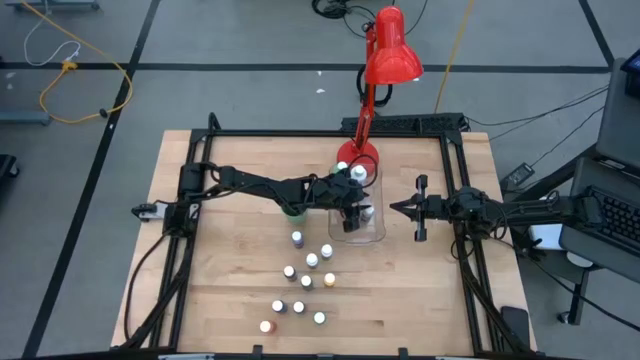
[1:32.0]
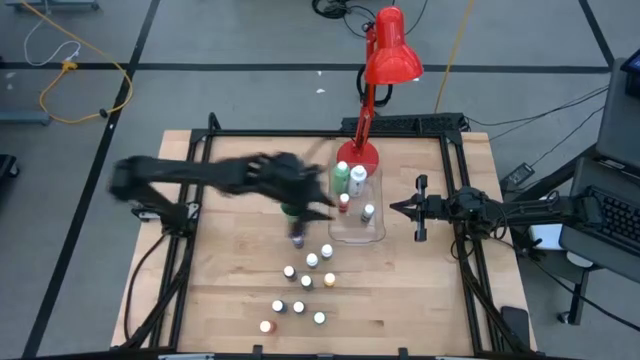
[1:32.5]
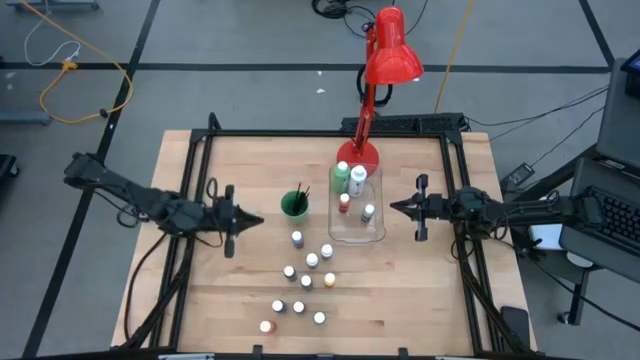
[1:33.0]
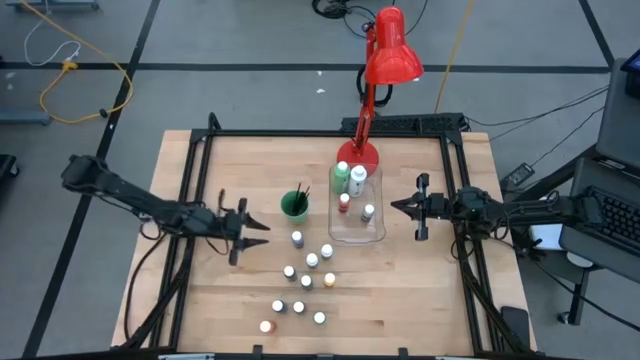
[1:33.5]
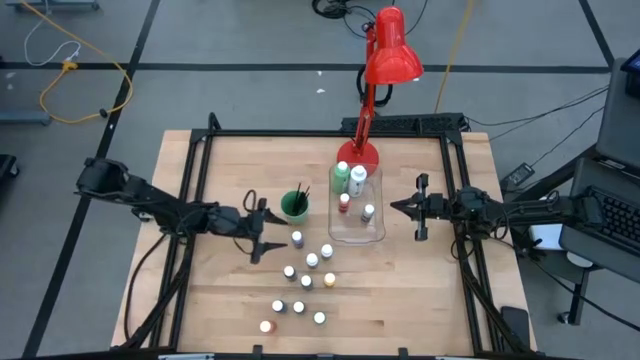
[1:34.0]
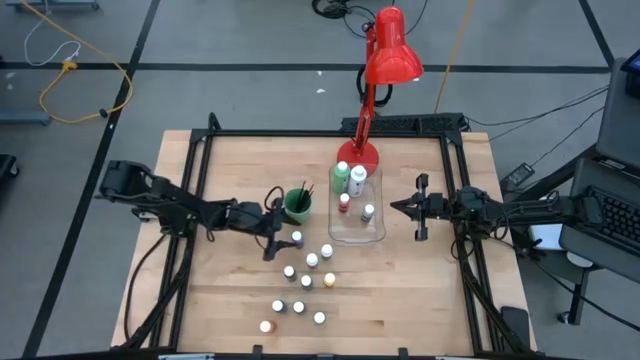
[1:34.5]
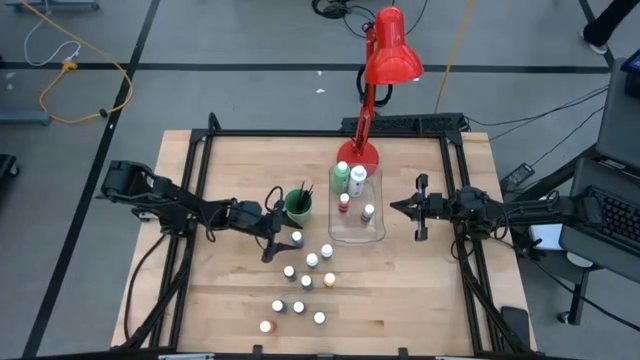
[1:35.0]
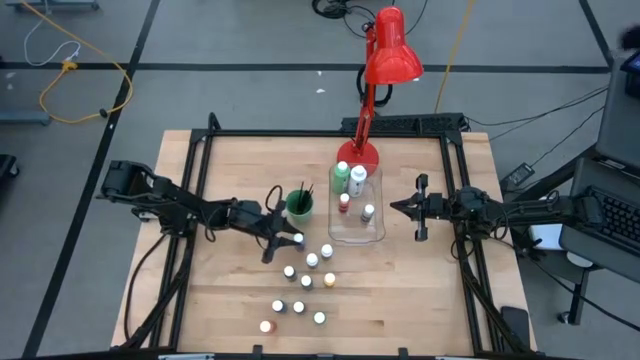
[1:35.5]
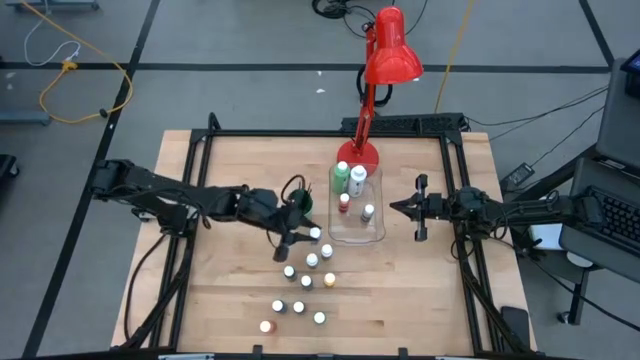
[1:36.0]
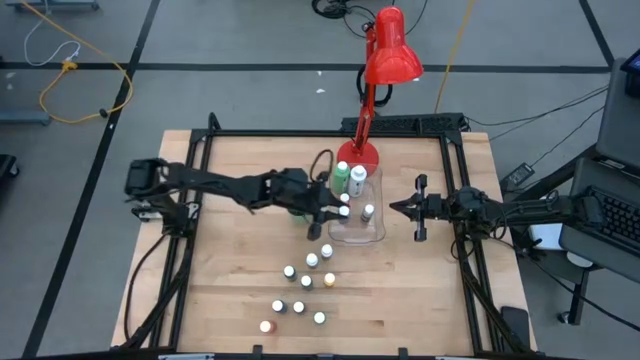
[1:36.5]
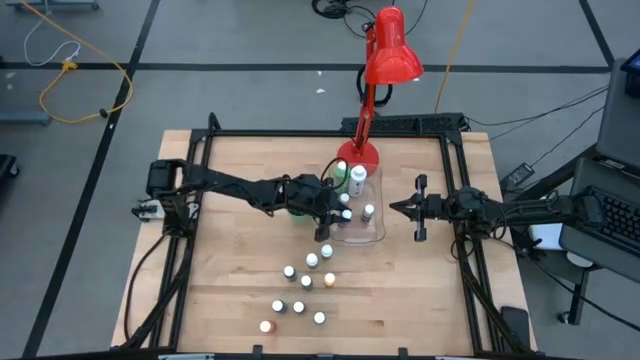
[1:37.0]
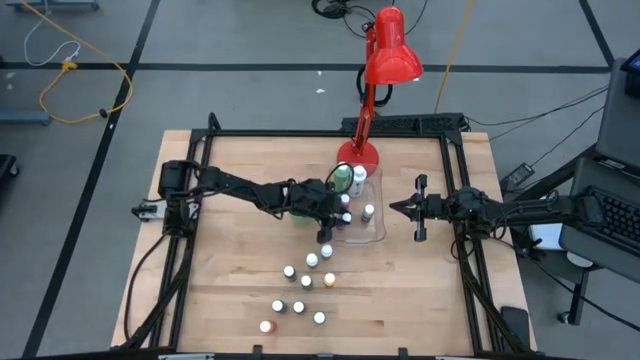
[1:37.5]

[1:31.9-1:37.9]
Task: Pick & Place Paint Supplies
Put the top blue paint bottle into the transparent bin

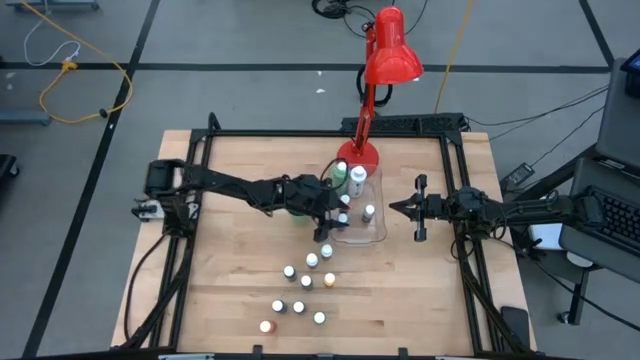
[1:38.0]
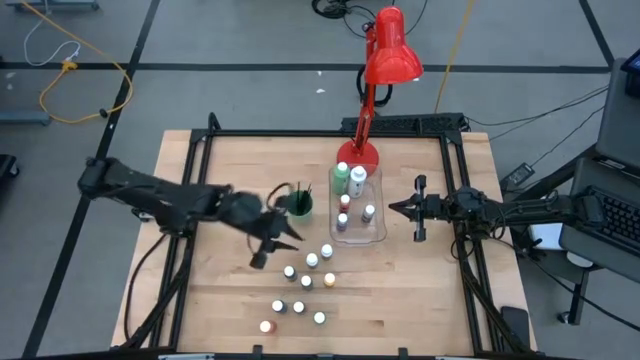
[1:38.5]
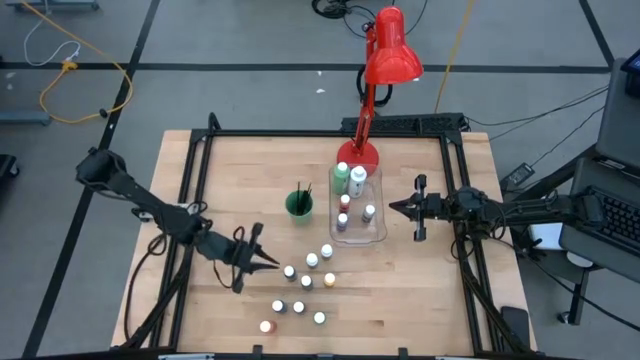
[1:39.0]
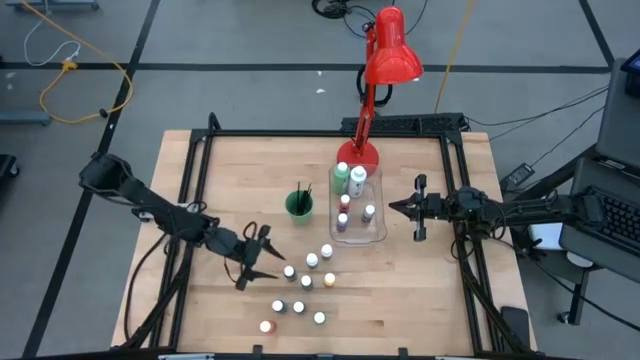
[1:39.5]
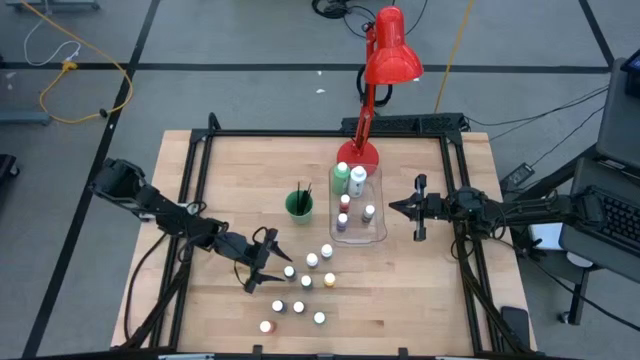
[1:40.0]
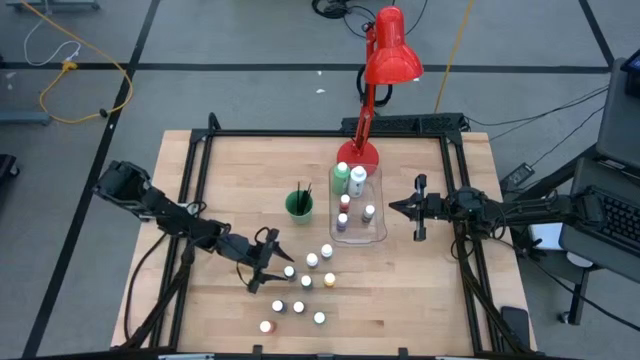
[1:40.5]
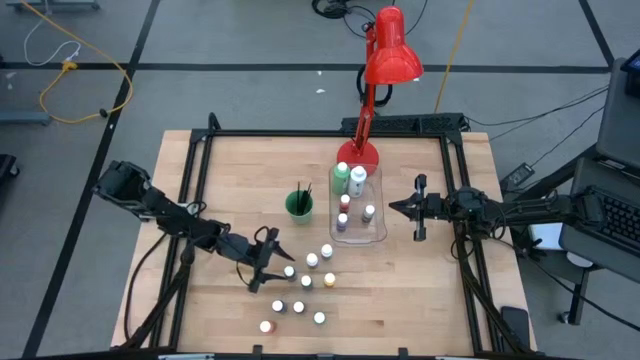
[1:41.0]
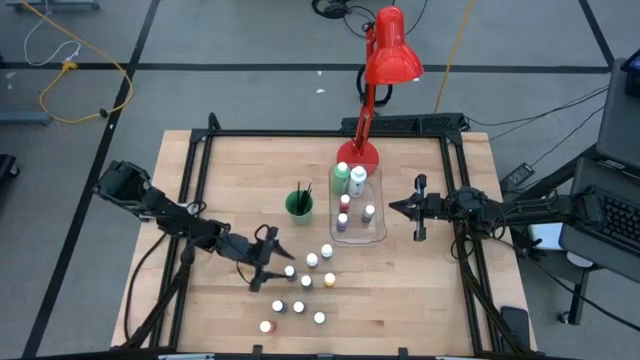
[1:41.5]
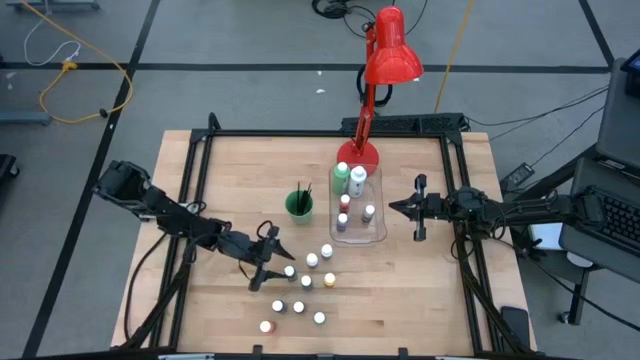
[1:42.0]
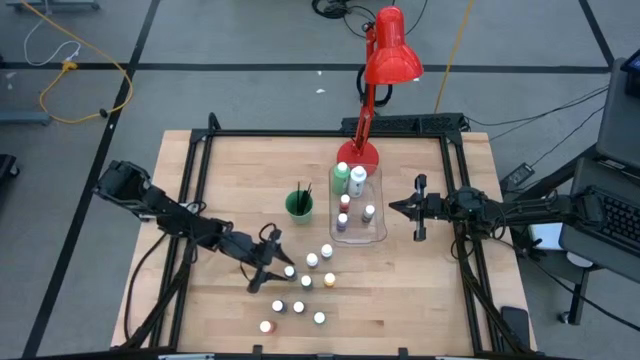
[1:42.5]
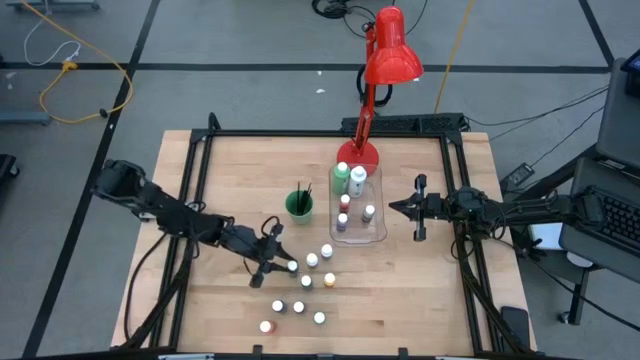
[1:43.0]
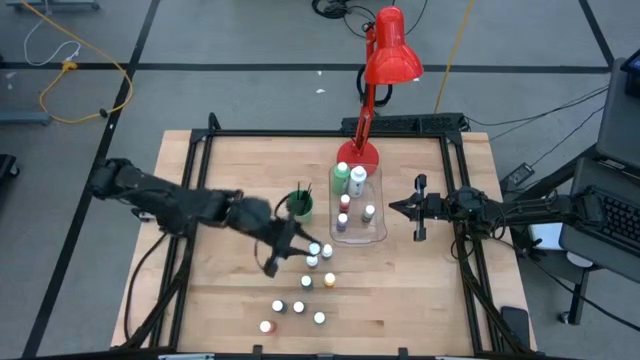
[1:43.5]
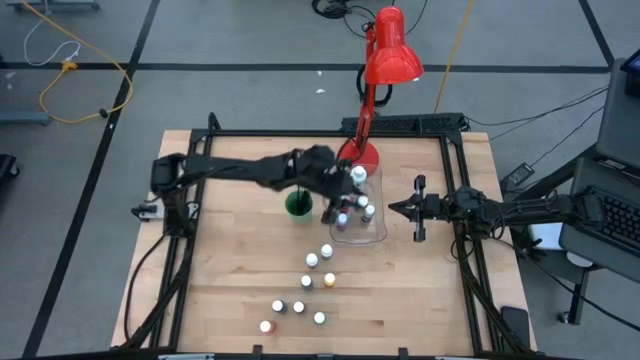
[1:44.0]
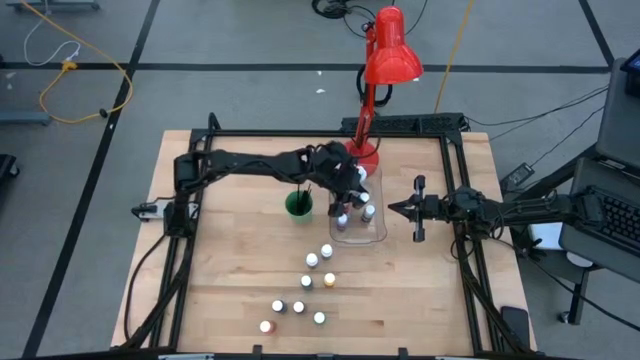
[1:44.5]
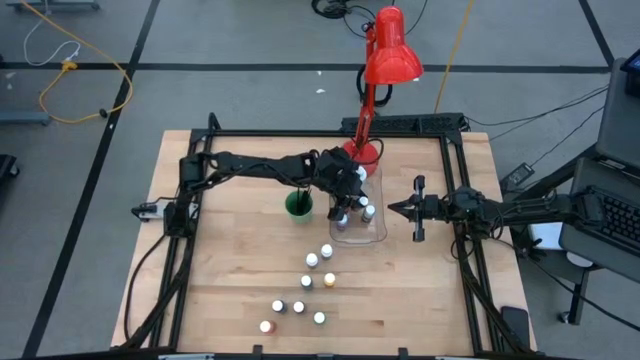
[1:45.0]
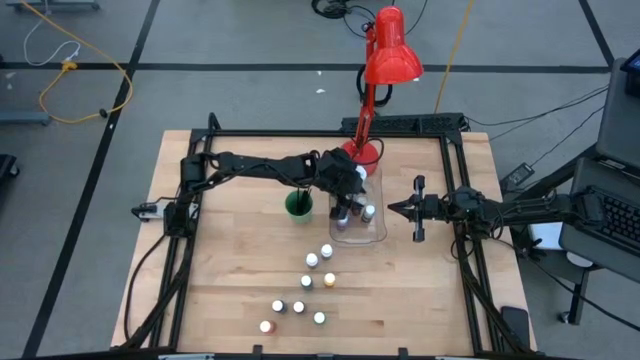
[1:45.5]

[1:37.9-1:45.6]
Put the top black paint bottle into the transparent bin

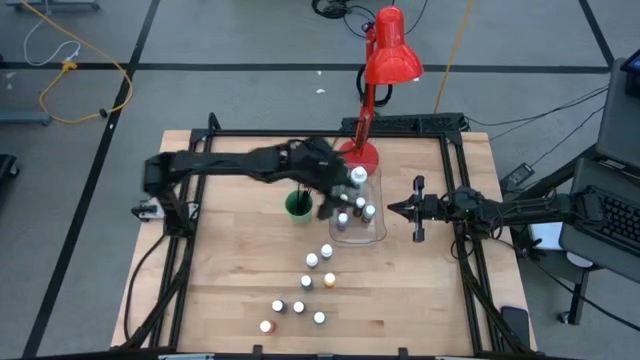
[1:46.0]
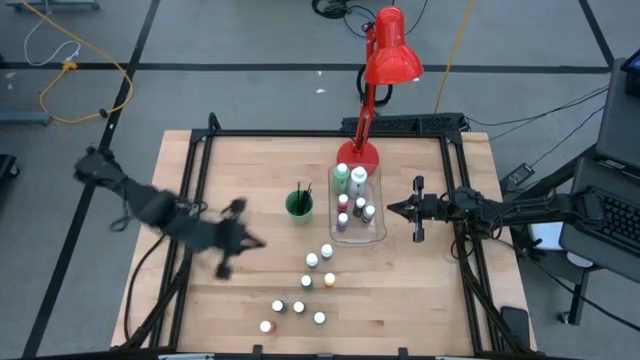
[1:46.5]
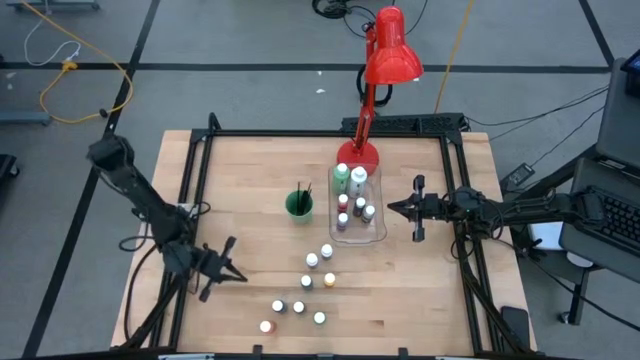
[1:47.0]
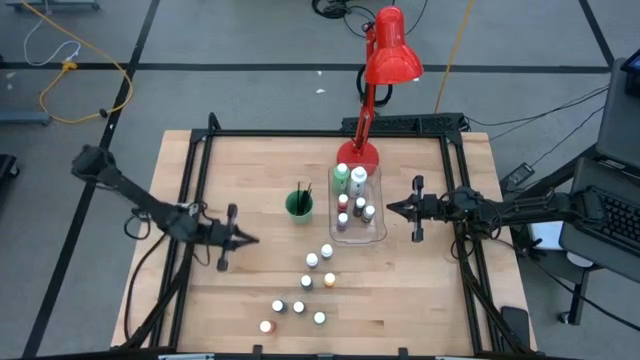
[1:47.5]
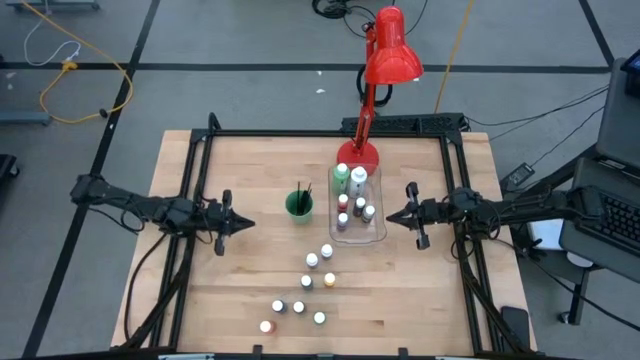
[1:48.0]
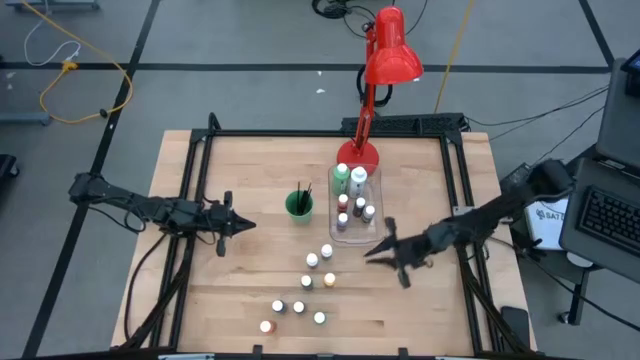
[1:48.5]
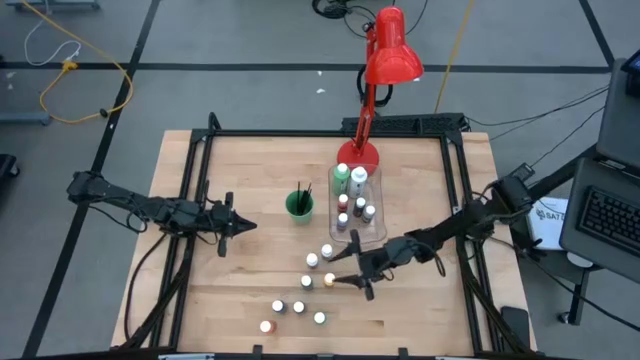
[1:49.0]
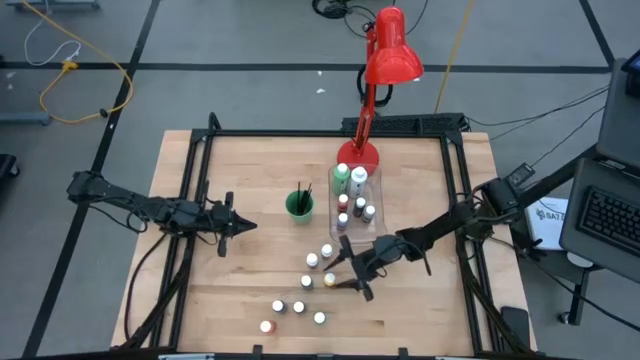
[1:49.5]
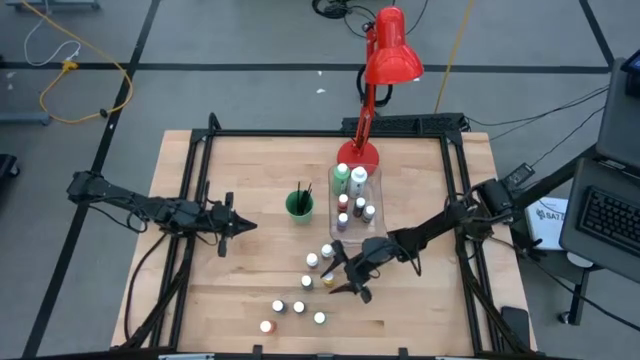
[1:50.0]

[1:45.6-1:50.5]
Put the yellow paint bottle into the transparent bin

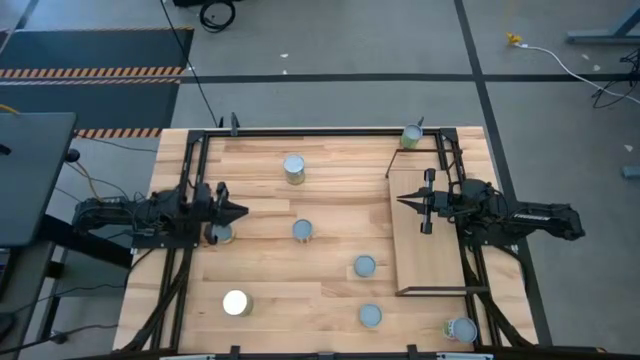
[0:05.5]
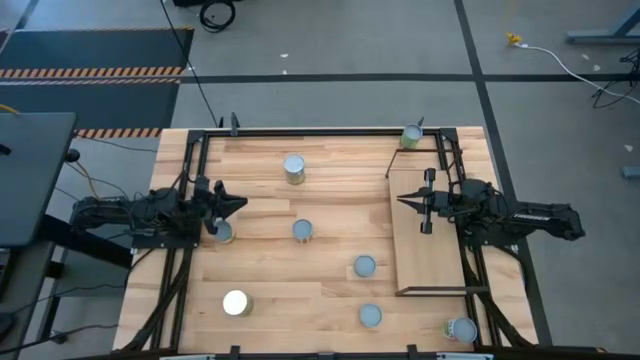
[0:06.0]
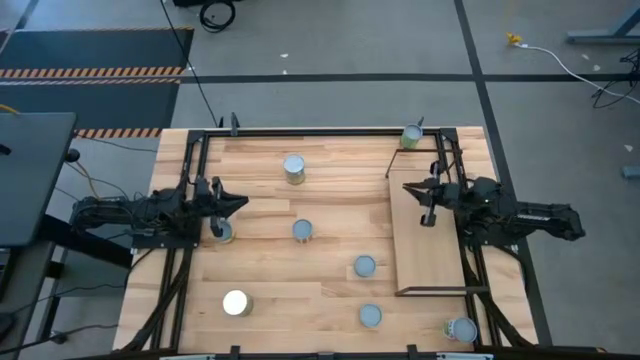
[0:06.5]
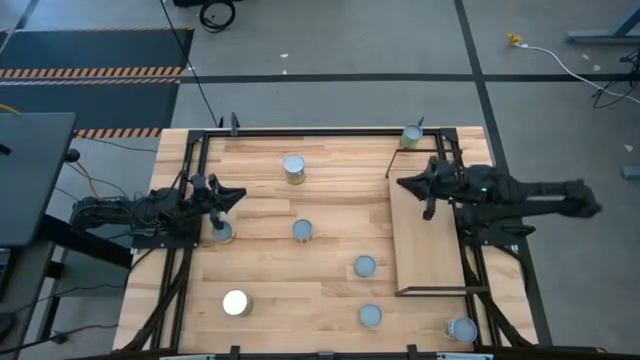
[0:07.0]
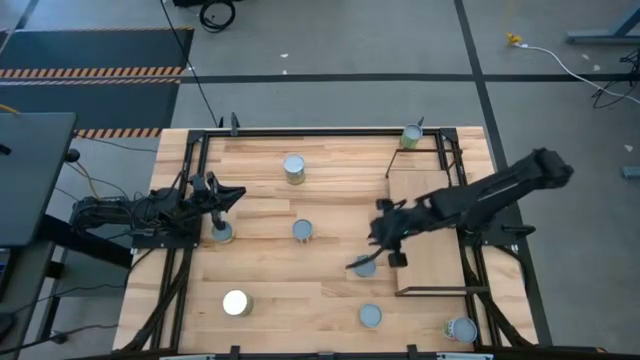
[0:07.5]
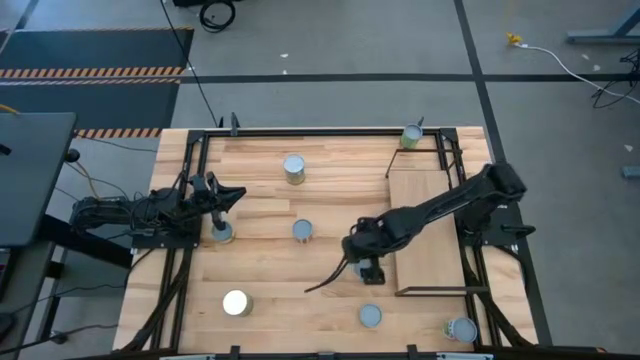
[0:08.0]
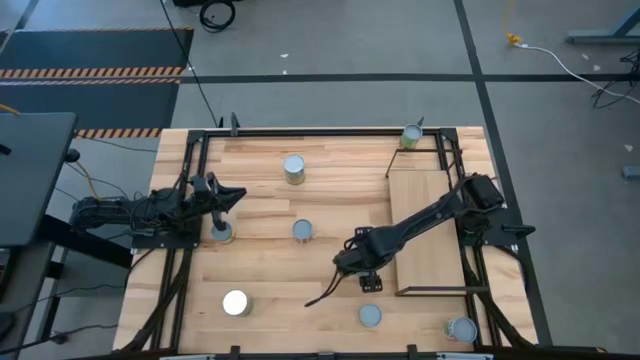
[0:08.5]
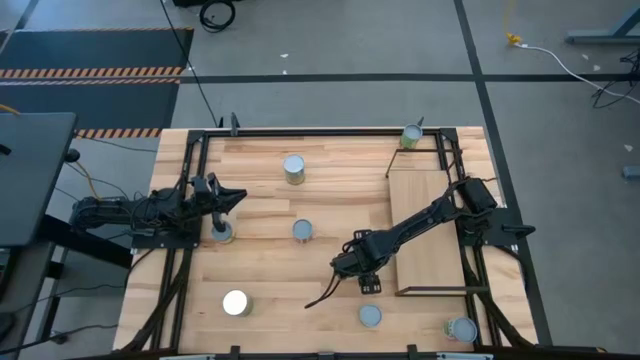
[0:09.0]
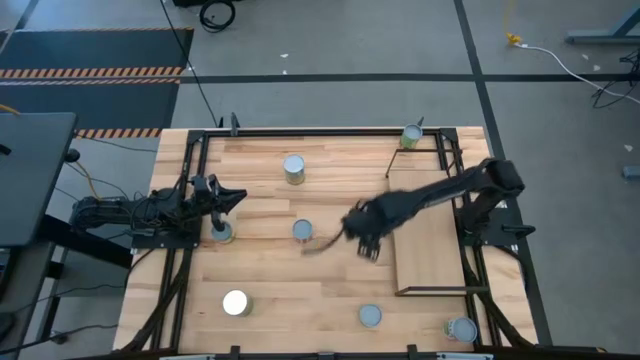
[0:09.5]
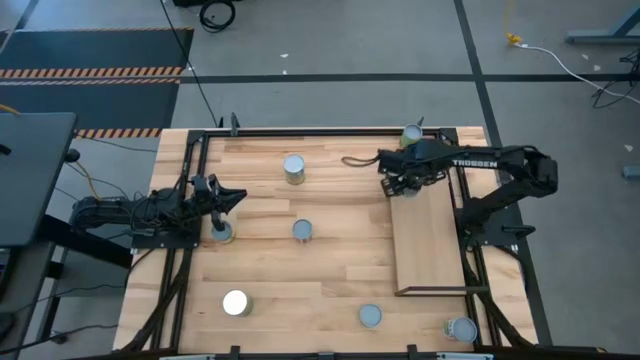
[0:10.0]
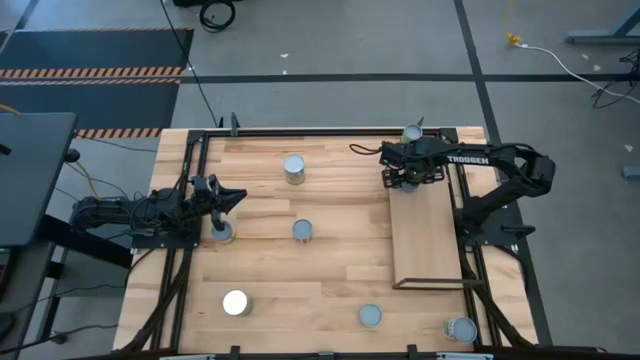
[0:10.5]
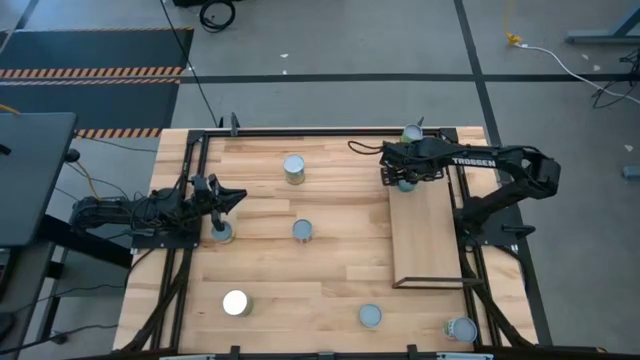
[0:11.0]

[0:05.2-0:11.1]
Task: Pick and place cans onto a shelf
Put the blue tuna can on the shelf
